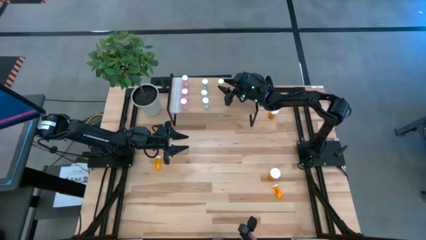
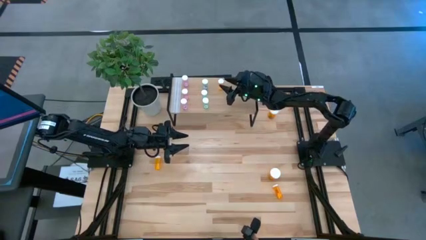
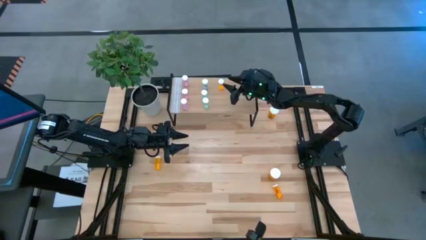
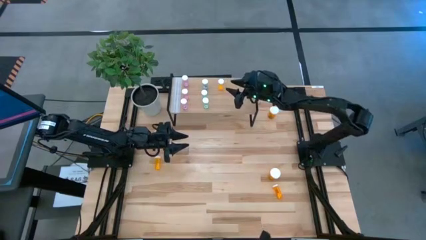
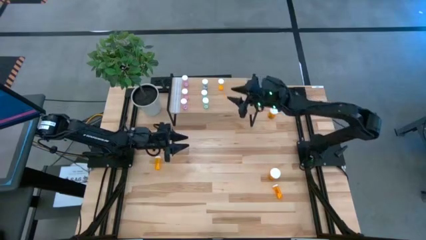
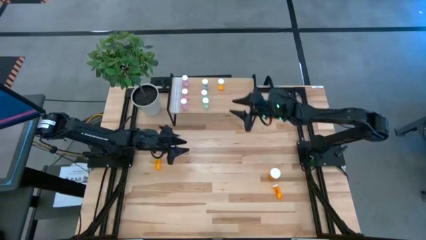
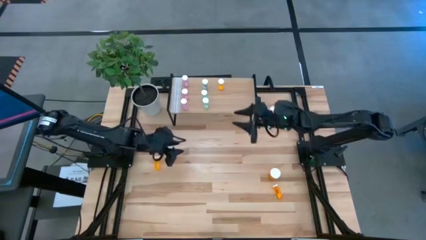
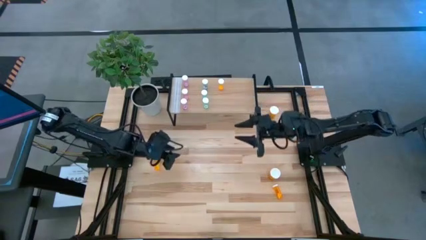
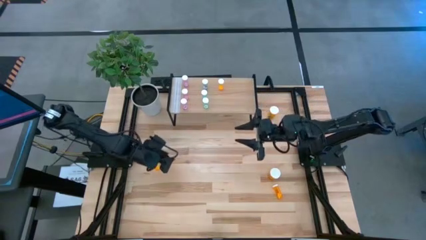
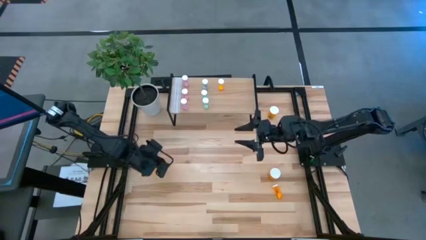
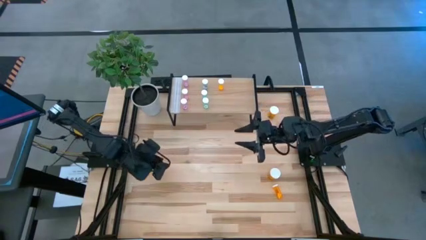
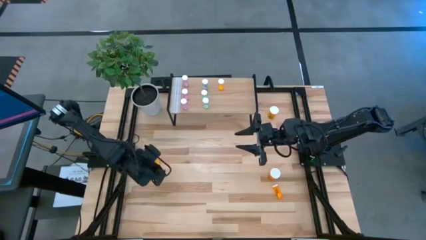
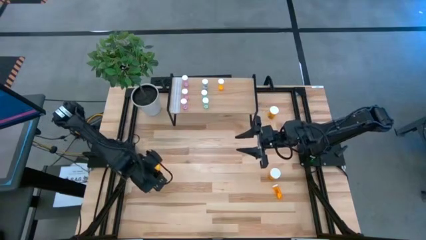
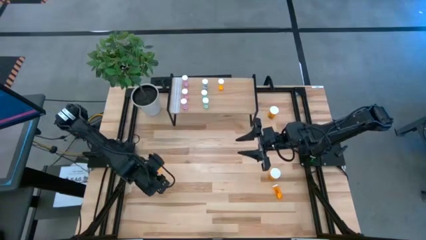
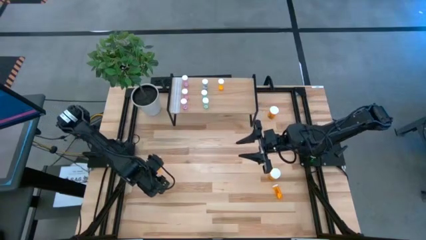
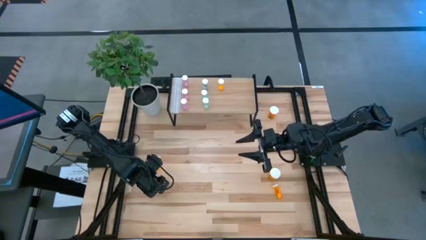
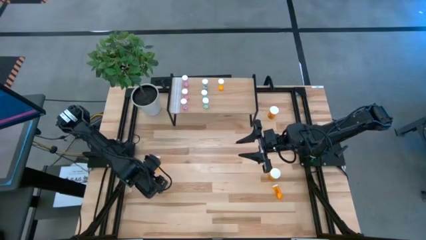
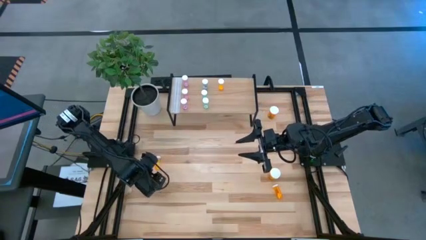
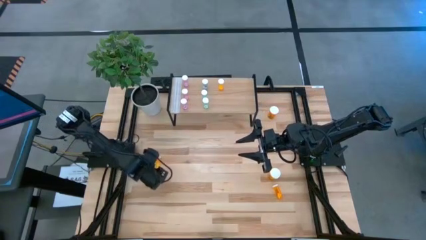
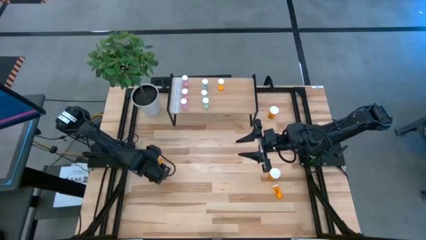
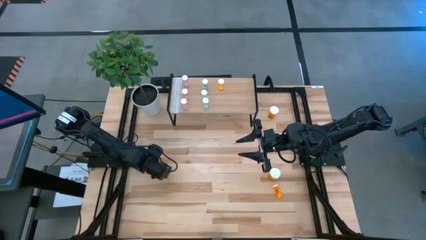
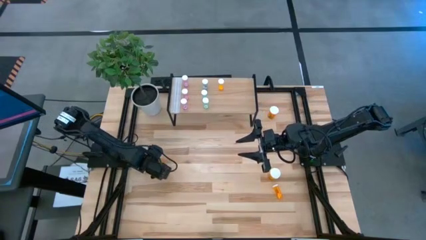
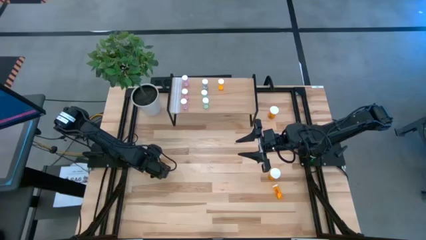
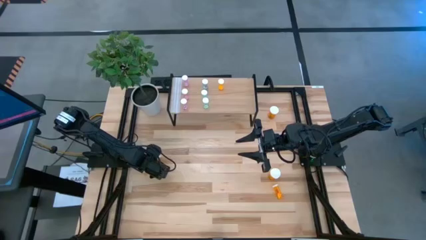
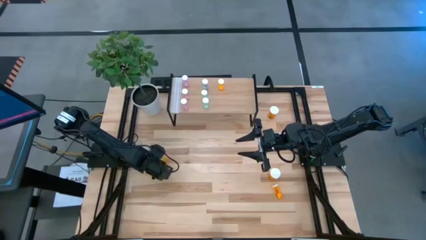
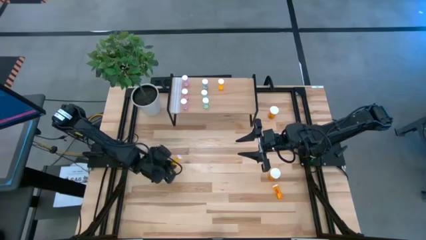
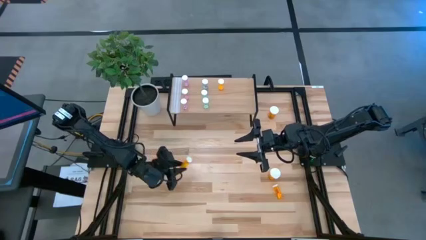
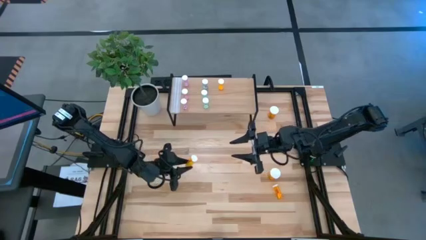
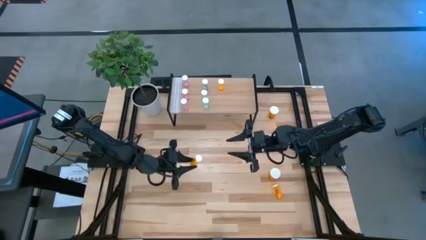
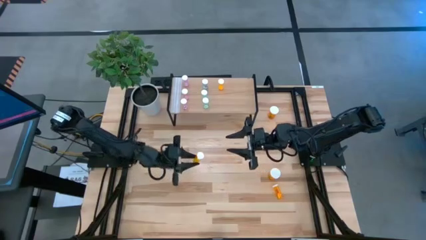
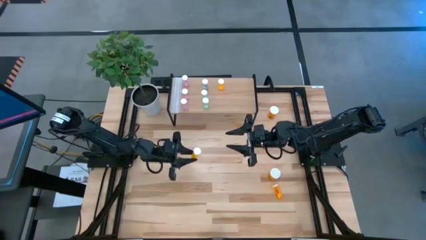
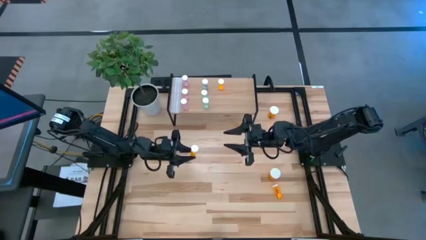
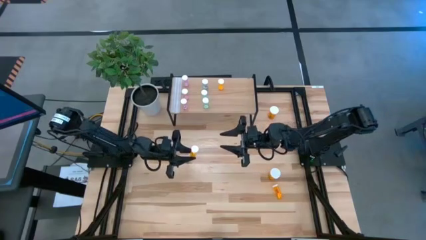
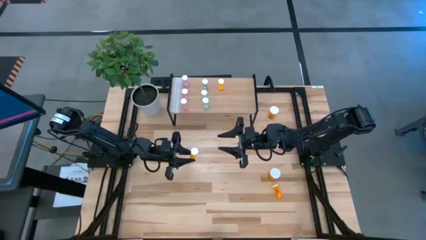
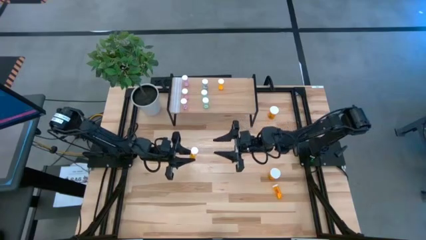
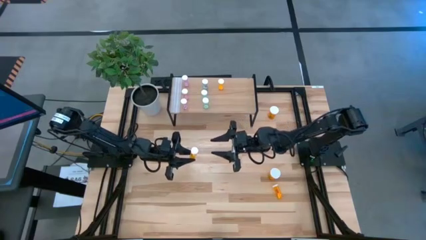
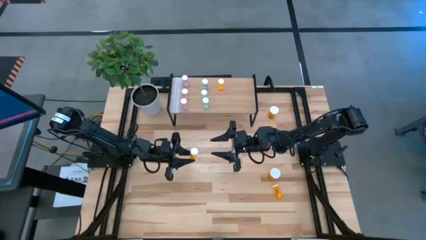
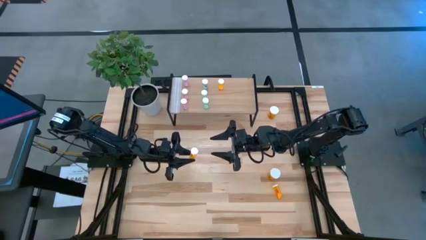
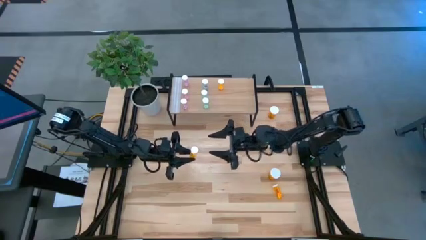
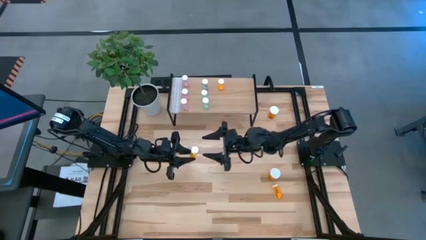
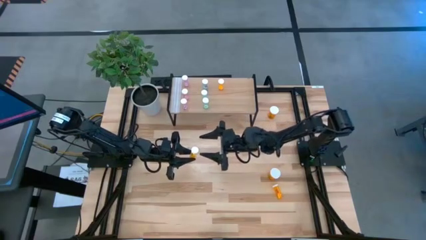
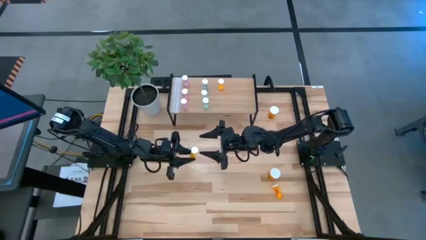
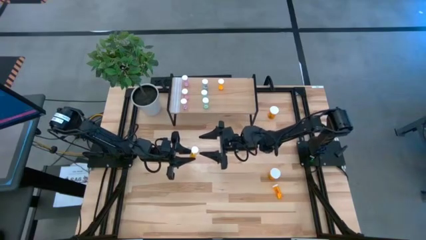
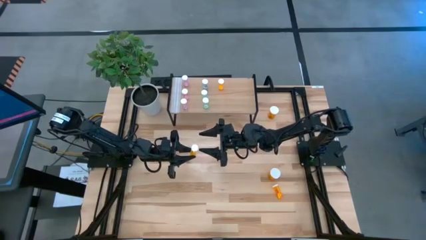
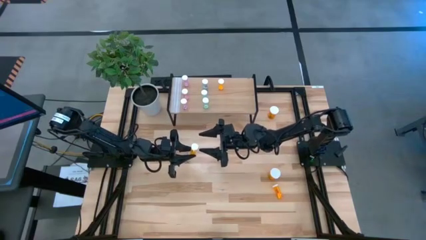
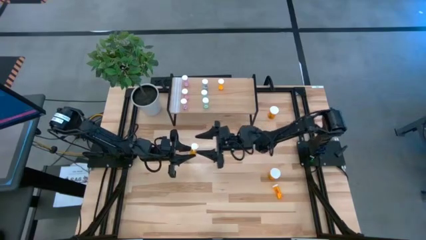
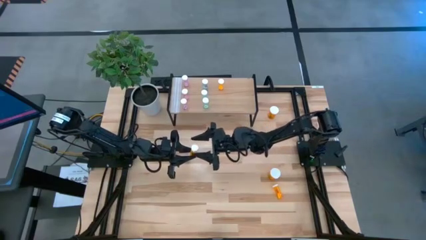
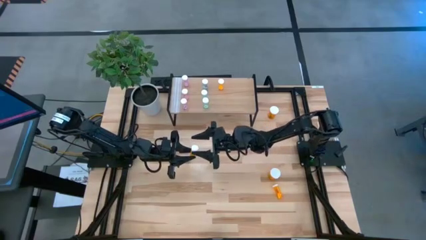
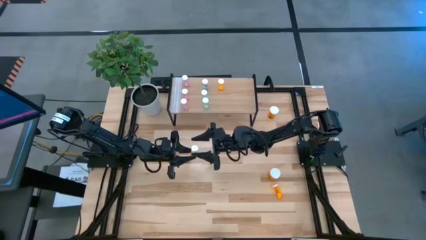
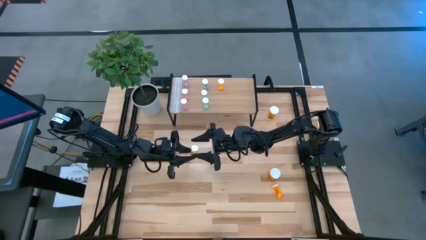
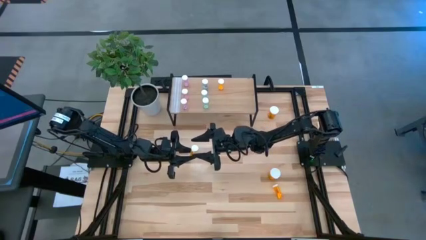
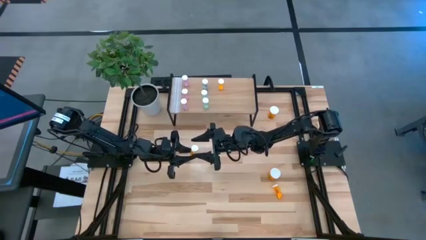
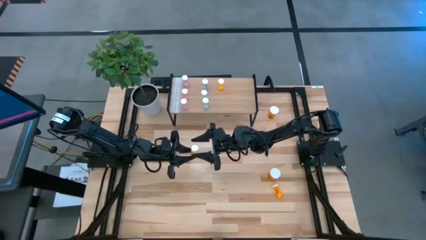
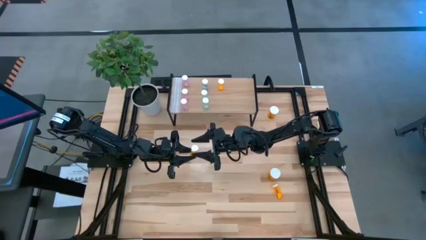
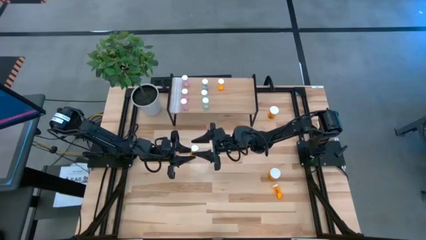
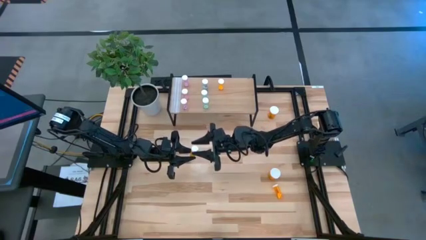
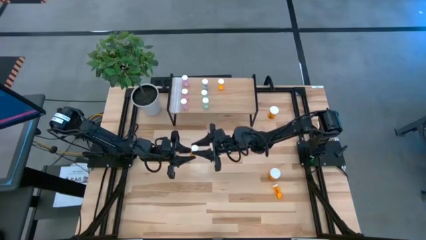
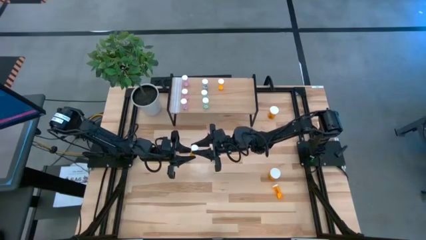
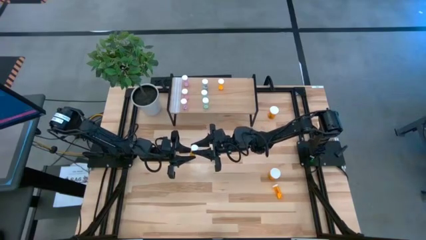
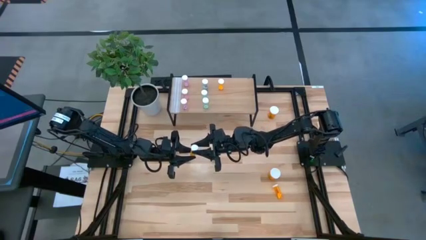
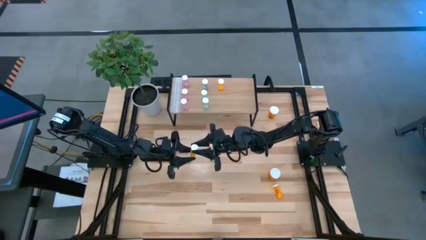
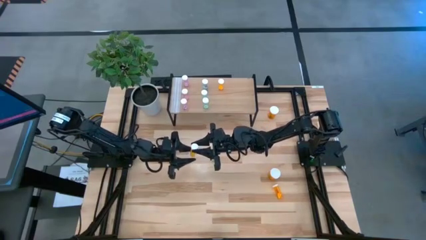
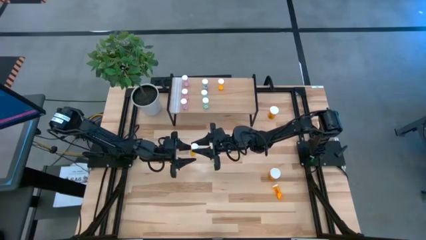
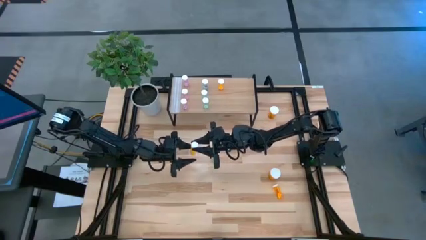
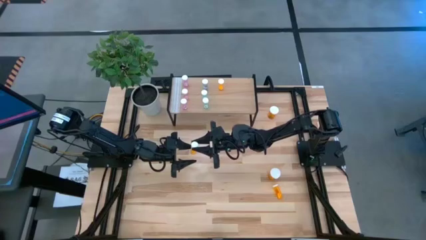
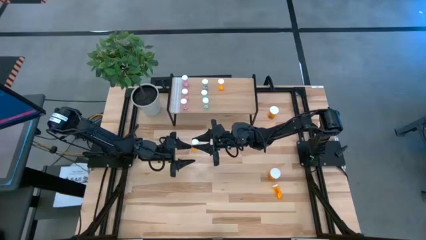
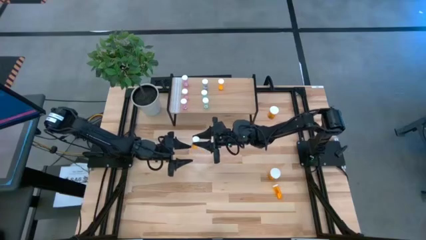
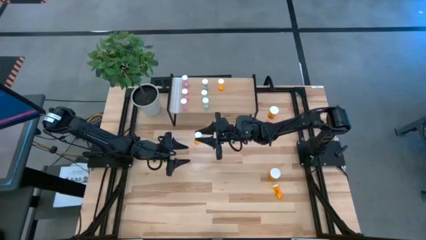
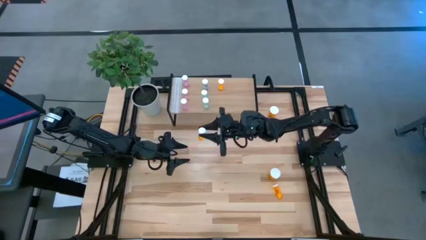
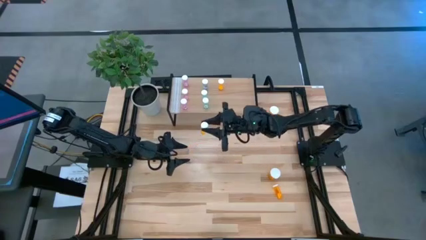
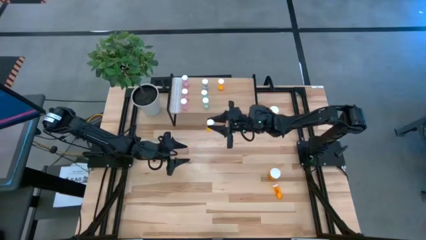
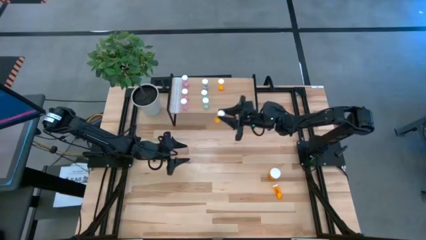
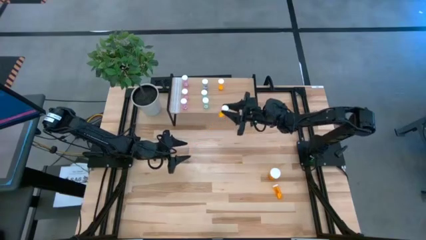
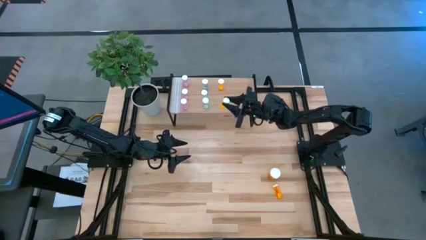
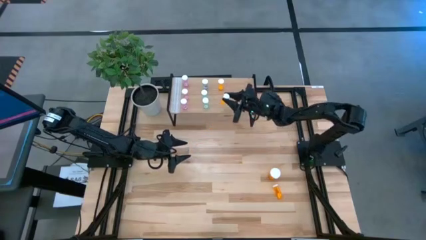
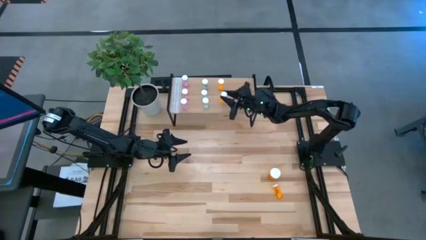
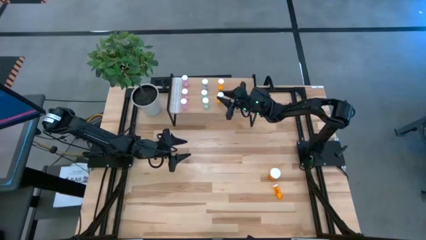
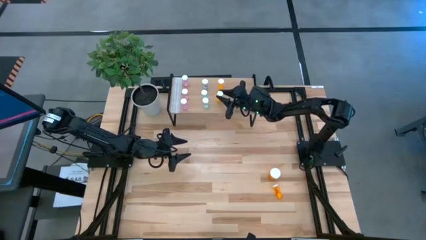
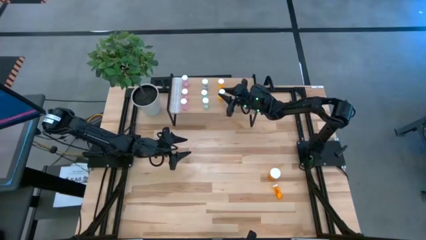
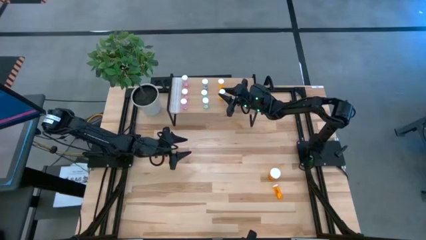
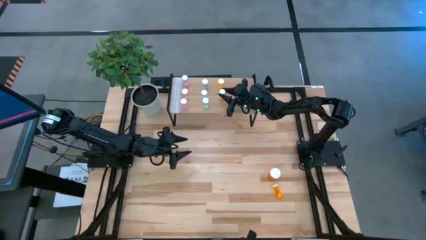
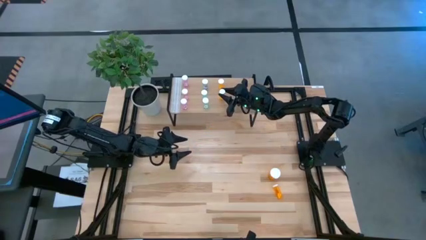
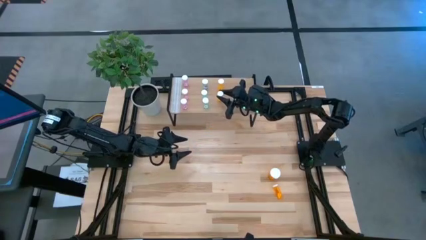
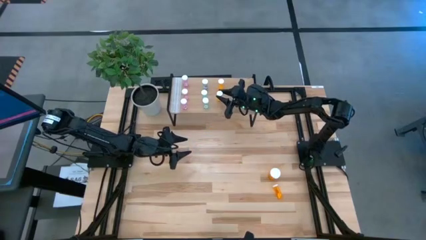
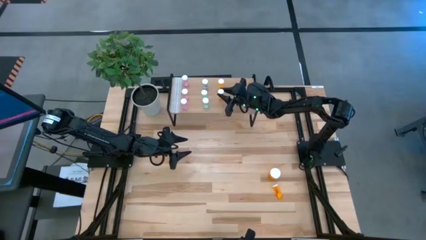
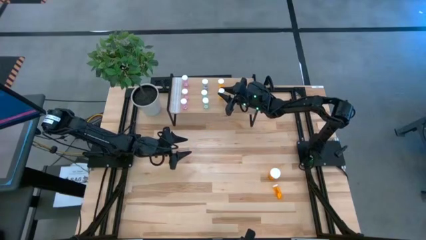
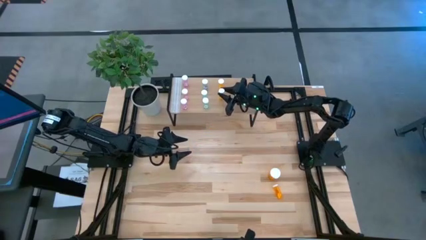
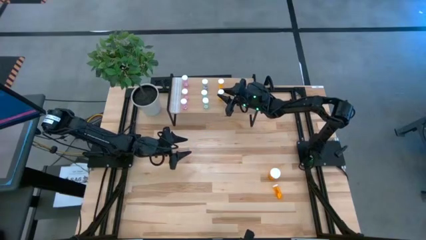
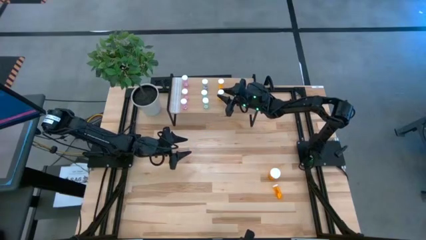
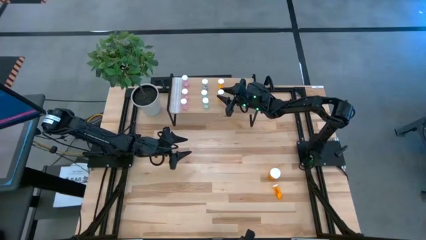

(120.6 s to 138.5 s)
Task: Pick and place medicine bottles onto shelf by color
Put the left small orange pill bottle aligned with the other small orange pill bottle on the shelf
